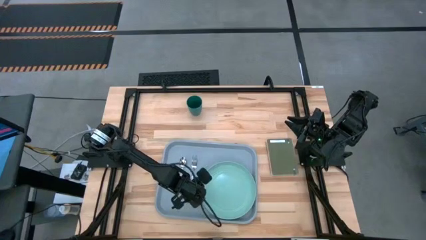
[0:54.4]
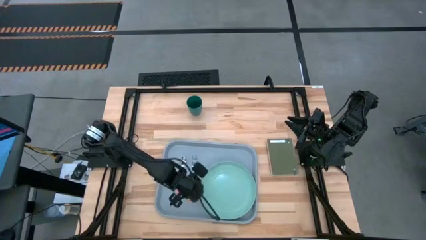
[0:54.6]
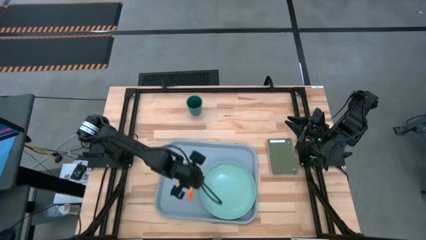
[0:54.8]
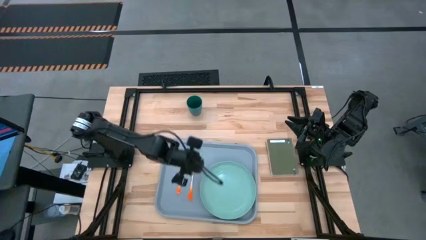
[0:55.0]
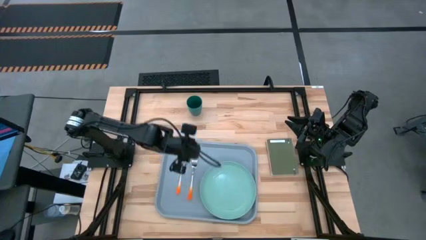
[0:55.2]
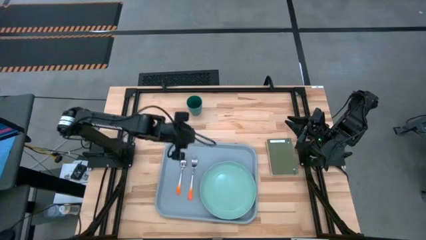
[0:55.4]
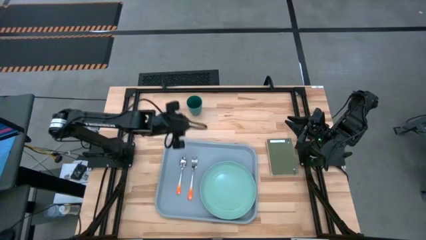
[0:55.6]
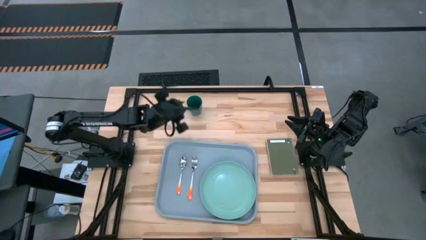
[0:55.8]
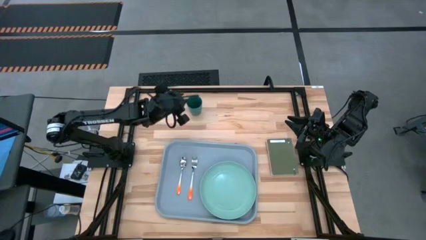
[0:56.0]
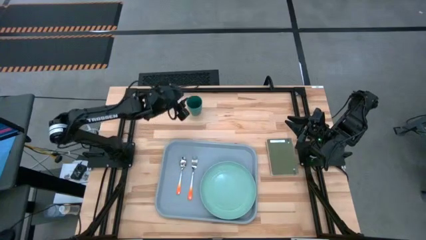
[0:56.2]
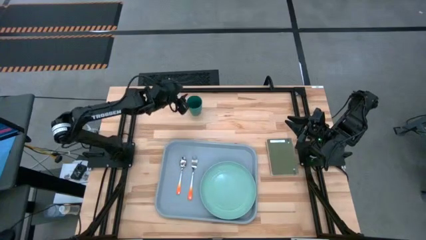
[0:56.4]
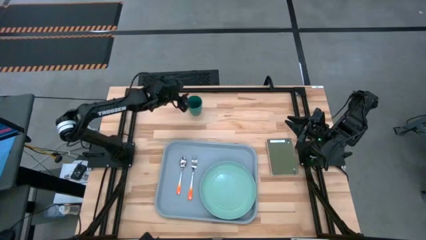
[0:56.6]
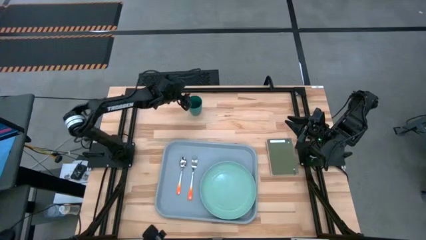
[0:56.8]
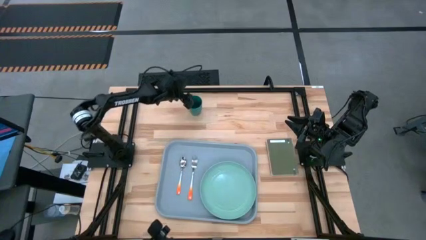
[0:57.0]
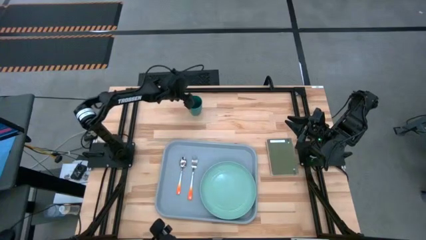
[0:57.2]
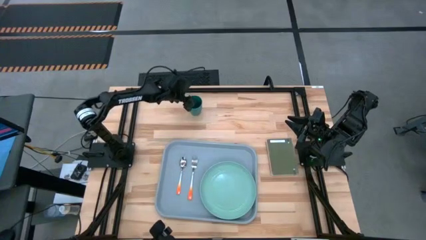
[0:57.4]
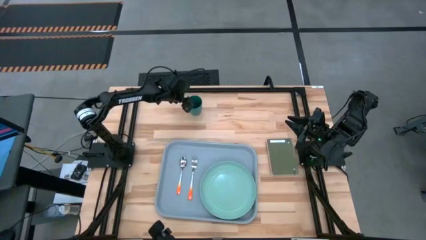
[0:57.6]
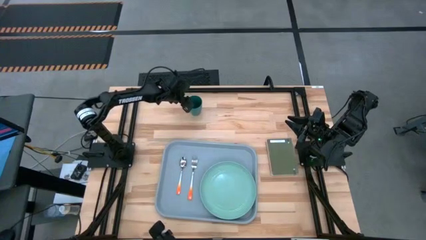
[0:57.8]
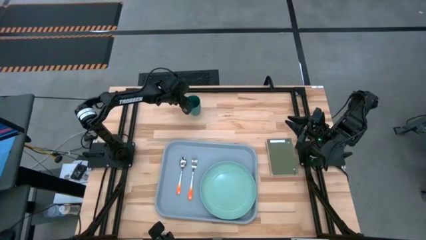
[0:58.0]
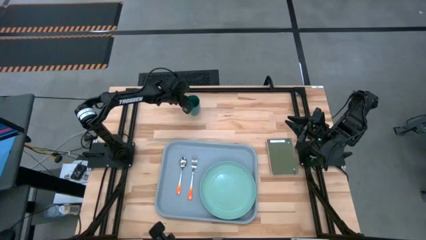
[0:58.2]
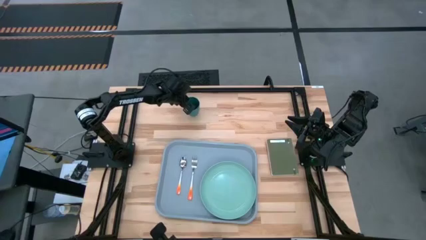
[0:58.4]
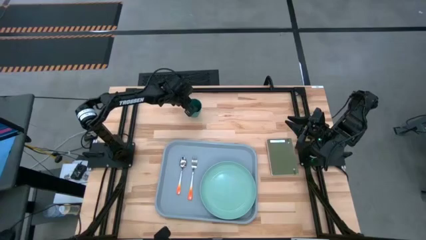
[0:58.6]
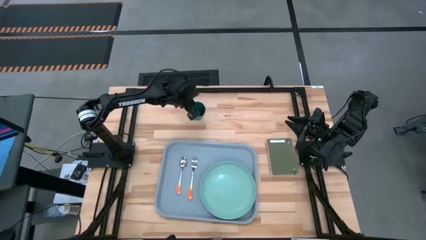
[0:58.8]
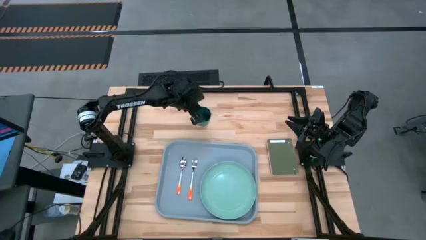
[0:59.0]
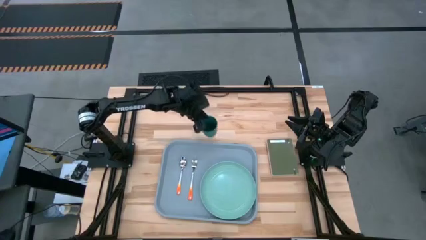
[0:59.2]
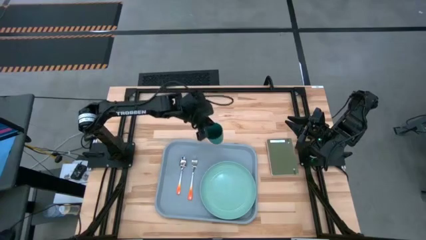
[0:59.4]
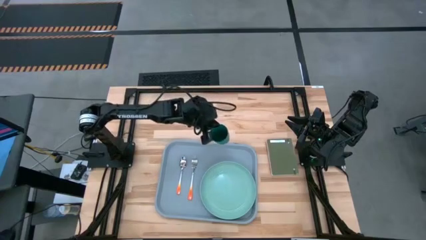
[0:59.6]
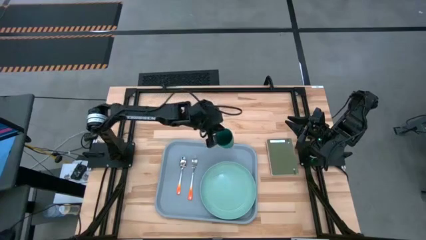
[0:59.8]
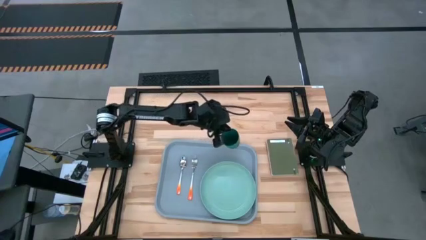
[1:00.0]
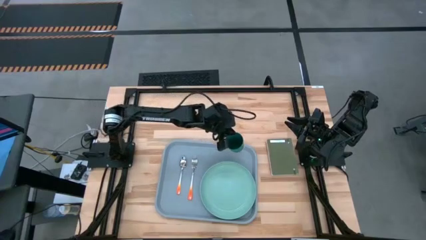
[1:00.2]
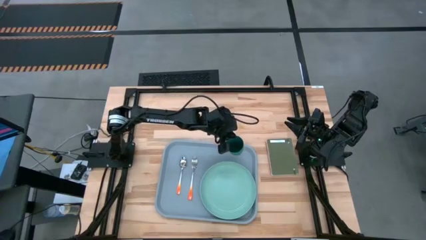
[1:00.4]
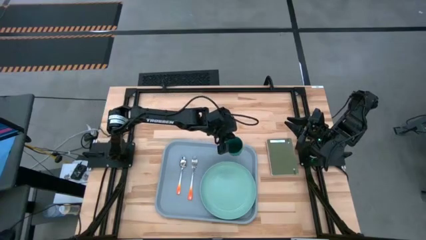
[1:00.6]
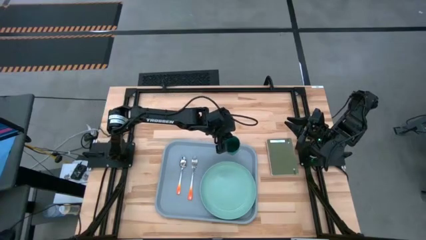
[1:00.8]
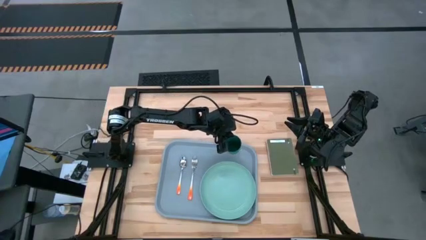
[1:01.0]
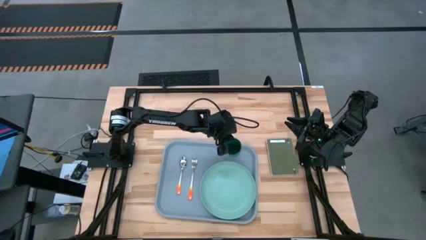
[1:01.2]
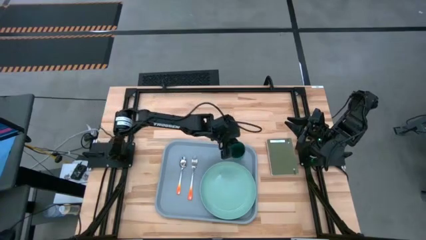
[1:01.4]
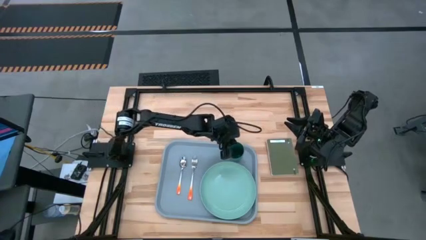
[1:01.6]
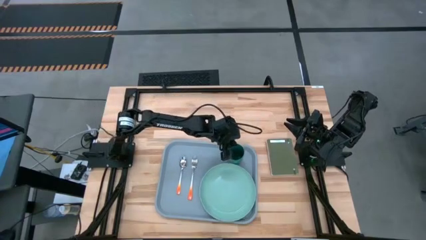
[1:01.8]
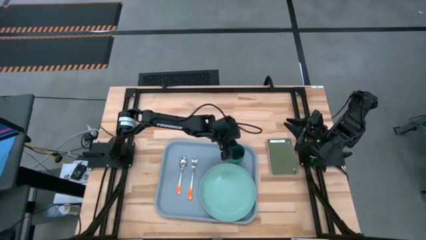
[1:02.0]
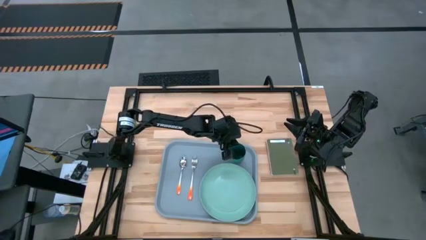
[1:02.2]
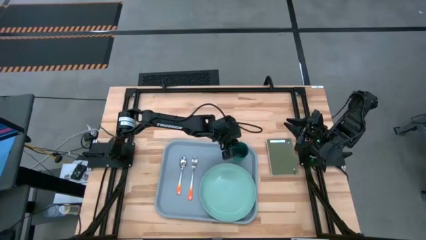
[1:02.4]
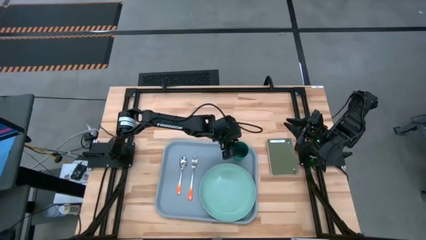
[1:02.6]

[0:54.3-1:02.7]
Task: Pick and place plate/cup/fork/spoon on tray
Put the green cup to the top of the green plate on the blue serving tray

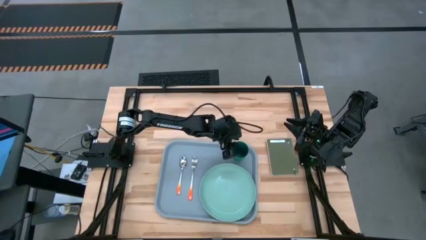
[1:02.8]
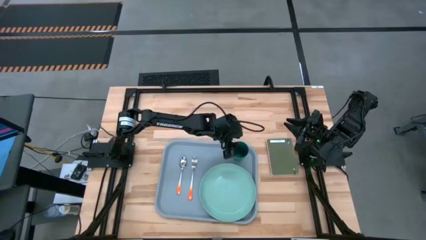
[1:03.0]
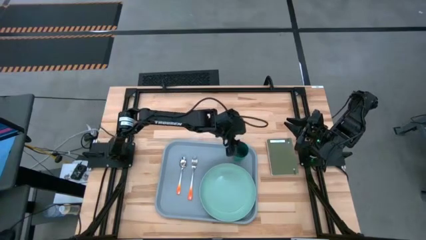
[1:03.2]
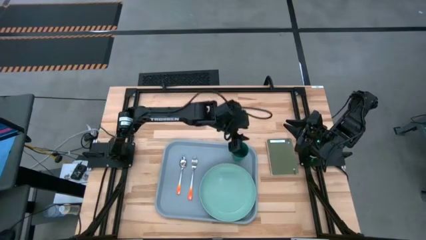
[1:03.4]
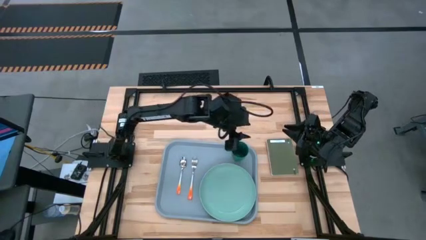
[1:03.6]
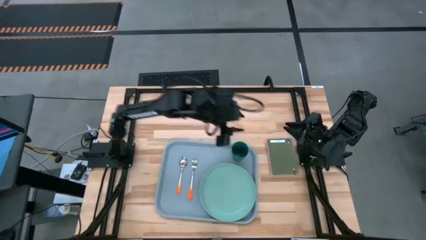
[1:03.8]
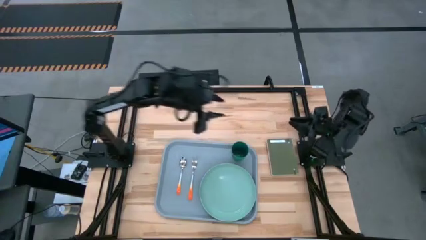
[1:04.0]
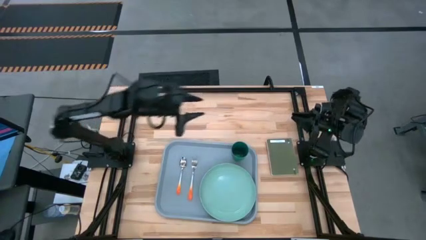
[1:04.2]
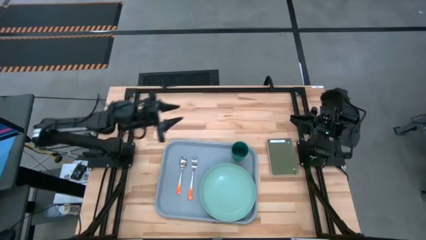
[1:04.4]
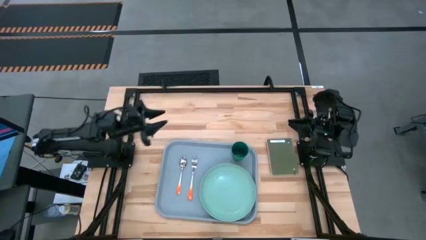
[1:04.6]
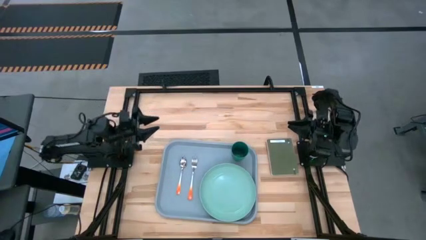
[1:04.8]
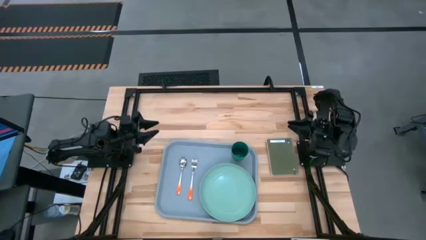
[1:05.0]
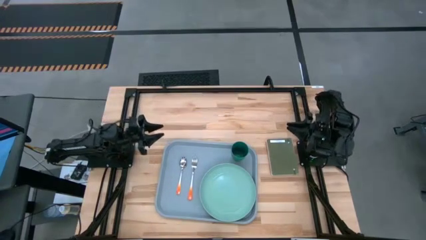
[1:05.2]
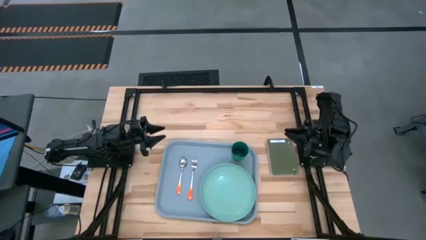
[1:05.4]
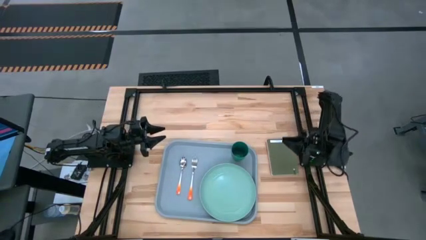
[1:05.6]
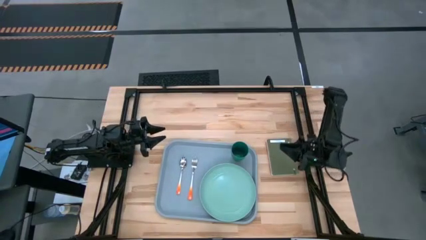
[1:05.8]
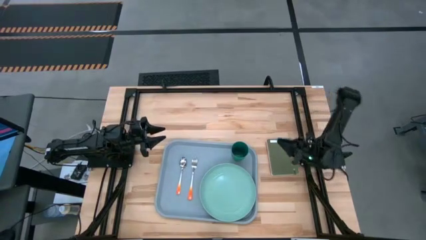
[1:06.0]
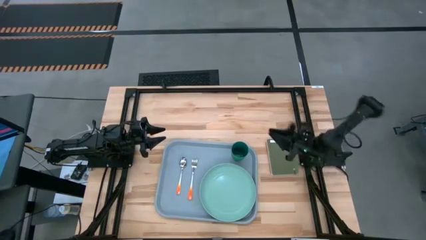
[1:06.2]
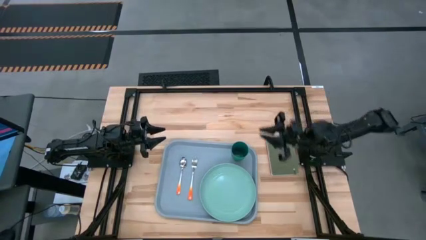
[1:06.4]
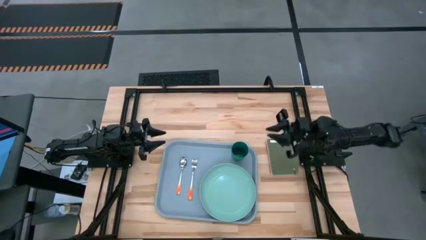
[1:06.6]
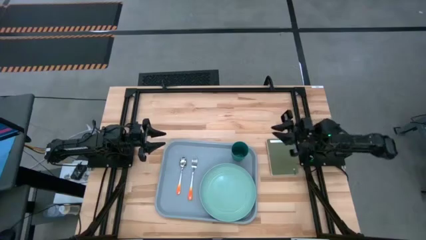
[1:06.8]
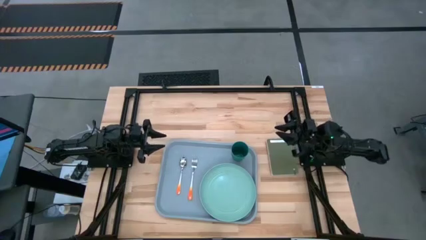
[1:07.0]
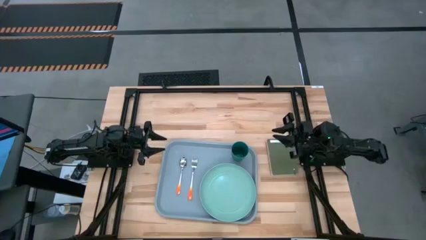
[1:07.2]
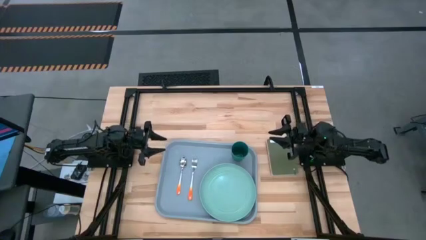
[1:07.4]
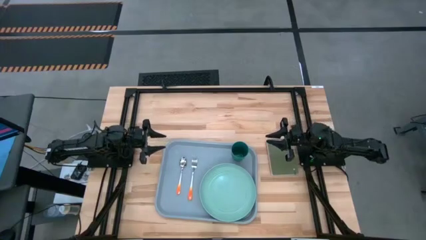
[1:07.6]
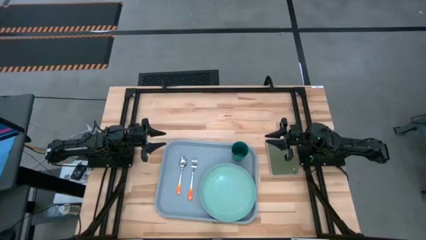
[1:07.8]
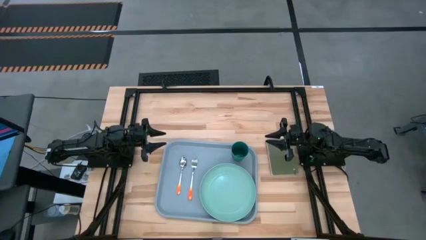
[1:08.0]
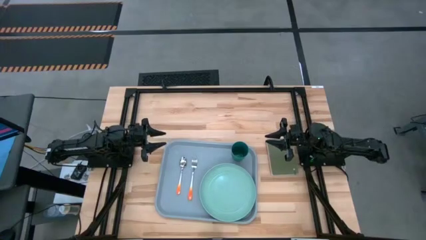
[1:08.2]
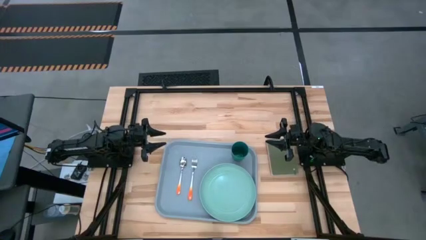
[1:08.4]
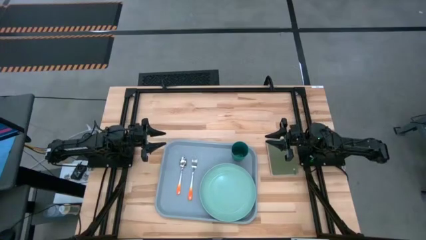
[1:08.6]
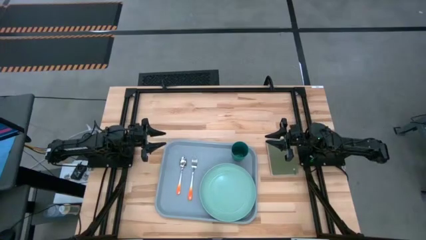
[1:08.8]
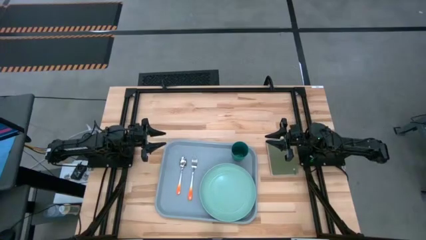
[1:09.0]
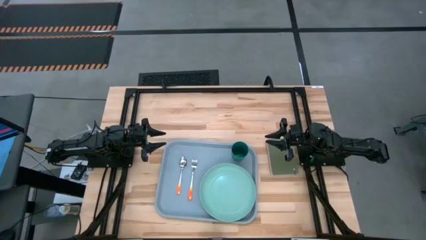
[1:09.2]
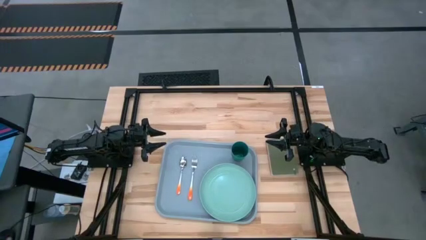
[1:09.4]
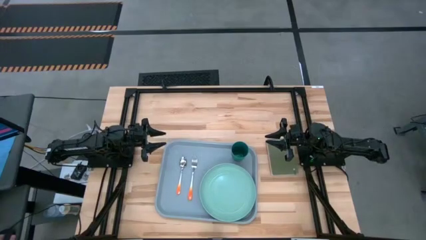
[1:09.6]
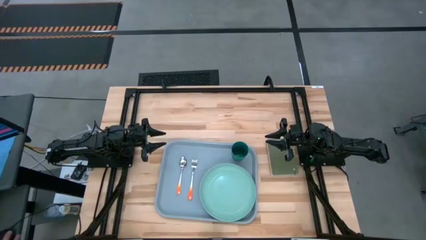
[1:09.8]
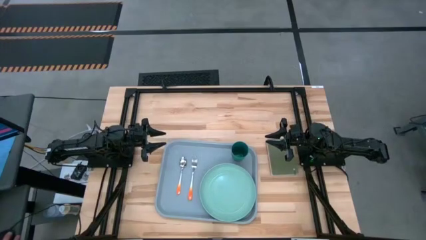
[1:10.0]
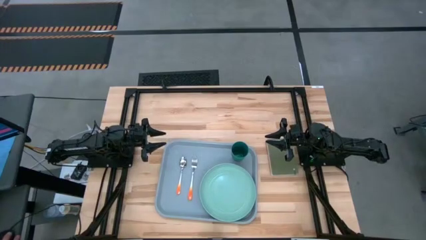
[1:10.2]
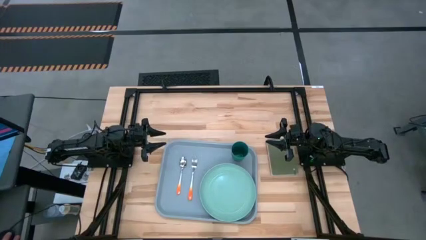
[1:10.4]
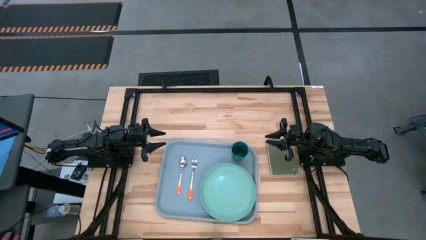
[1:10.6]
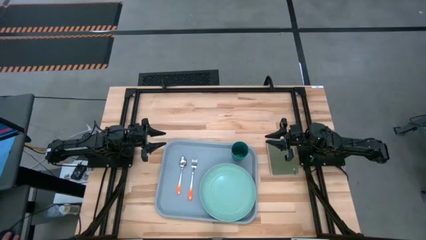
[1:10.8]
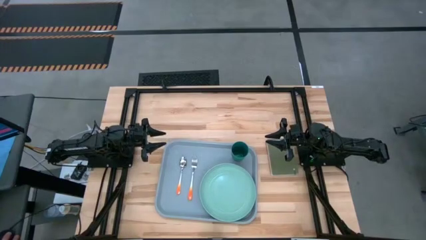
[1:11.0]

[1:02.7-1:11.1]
Return to Home Position
